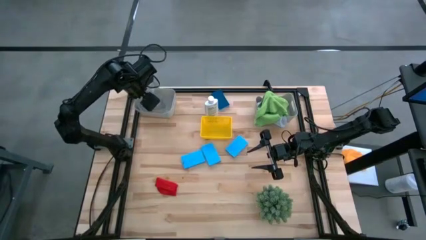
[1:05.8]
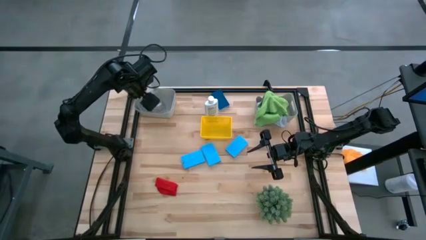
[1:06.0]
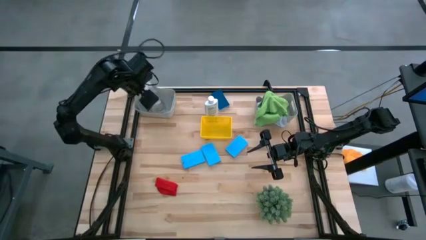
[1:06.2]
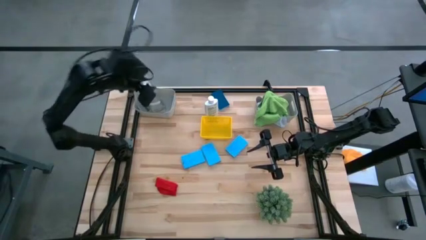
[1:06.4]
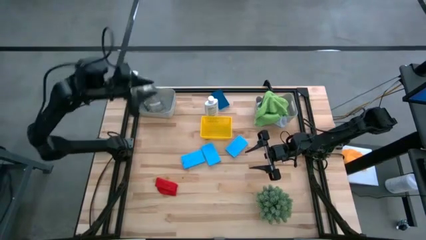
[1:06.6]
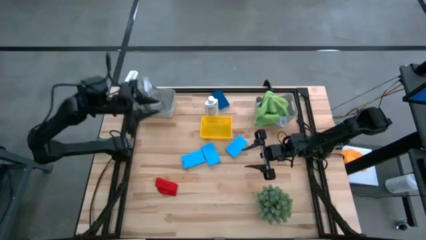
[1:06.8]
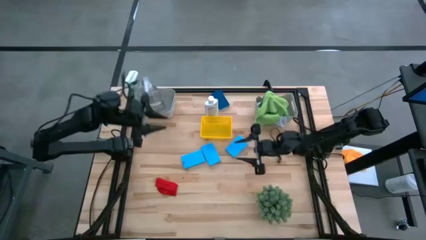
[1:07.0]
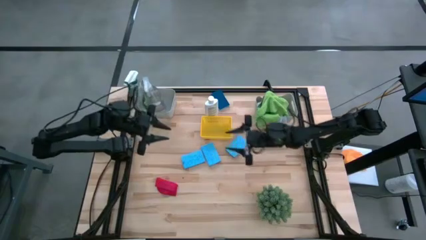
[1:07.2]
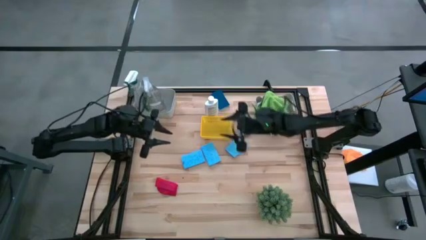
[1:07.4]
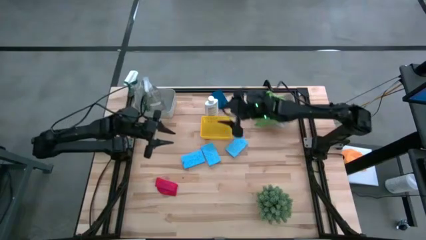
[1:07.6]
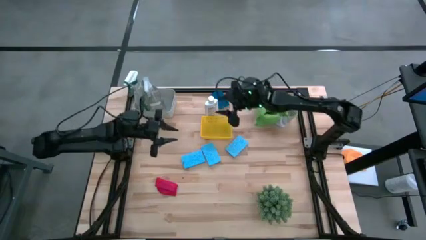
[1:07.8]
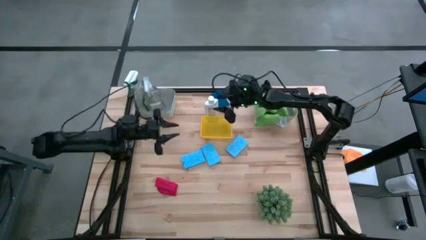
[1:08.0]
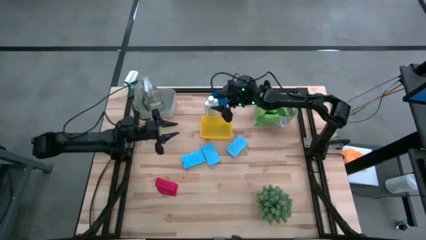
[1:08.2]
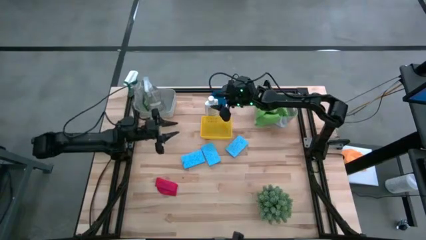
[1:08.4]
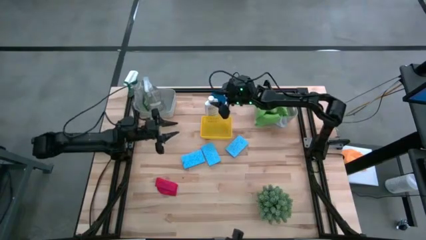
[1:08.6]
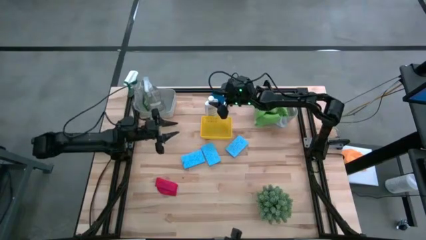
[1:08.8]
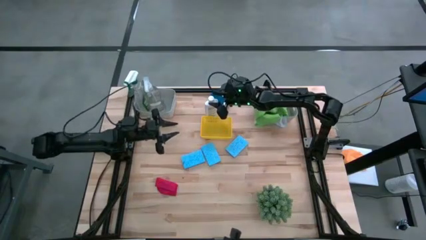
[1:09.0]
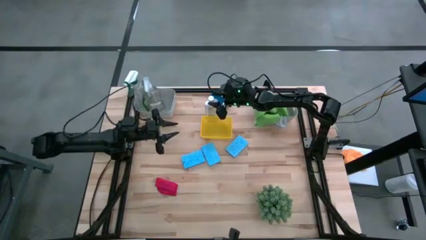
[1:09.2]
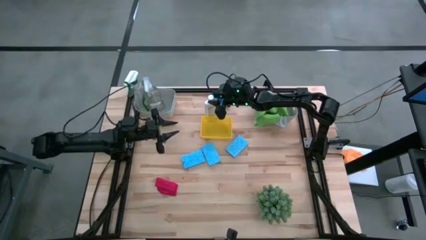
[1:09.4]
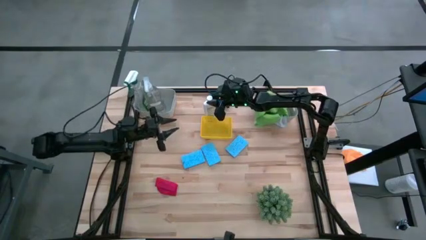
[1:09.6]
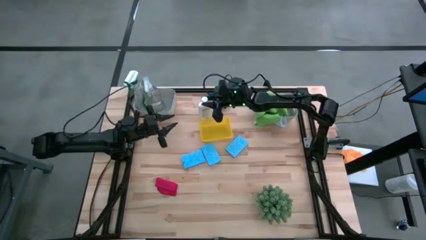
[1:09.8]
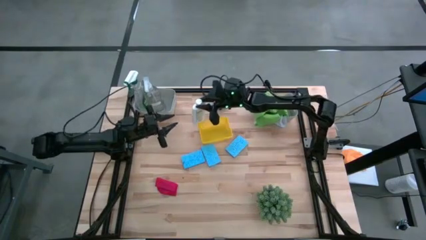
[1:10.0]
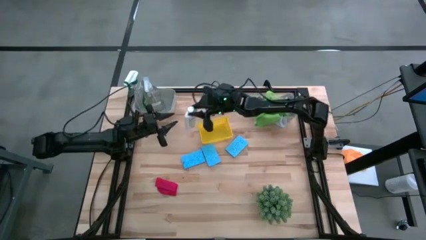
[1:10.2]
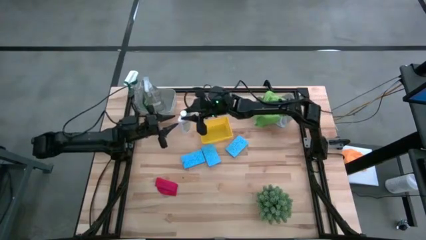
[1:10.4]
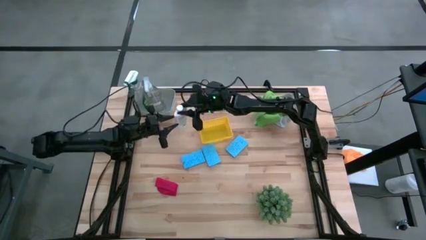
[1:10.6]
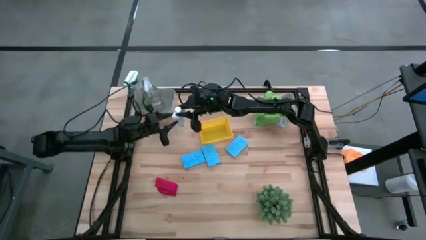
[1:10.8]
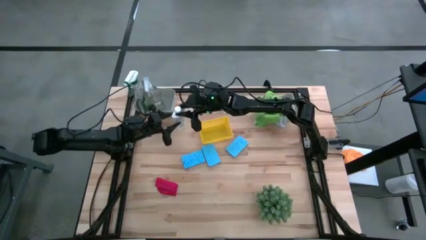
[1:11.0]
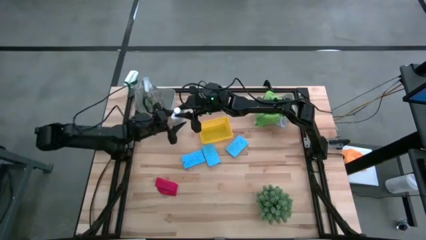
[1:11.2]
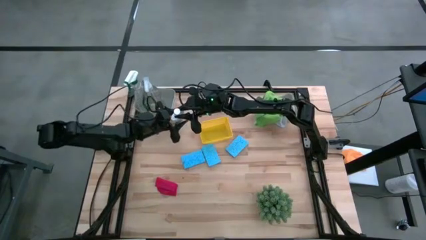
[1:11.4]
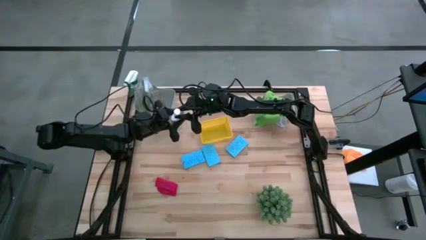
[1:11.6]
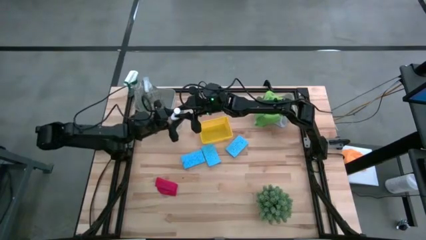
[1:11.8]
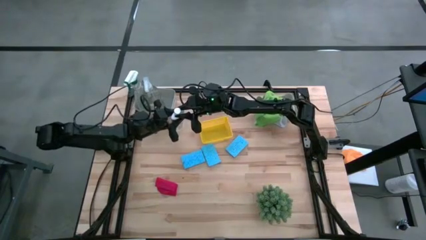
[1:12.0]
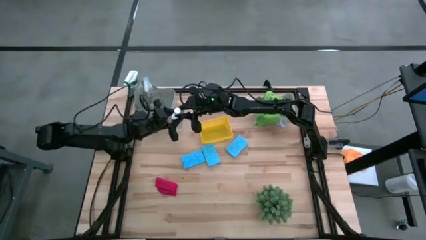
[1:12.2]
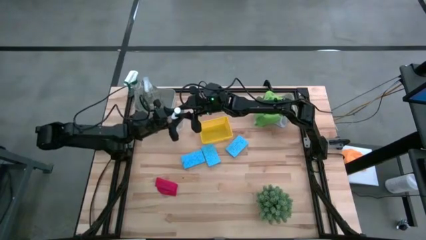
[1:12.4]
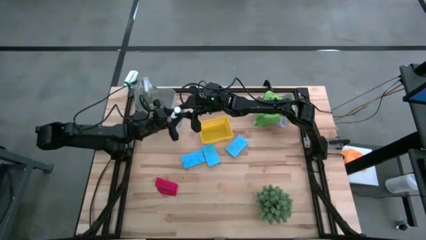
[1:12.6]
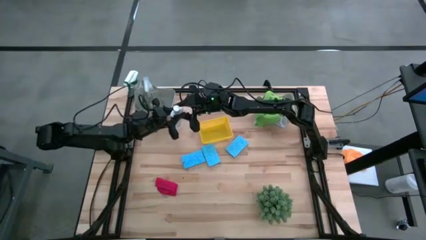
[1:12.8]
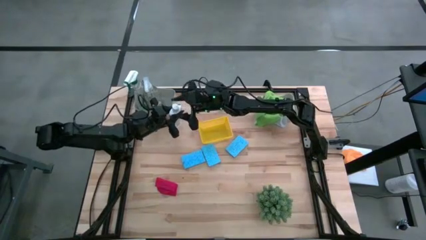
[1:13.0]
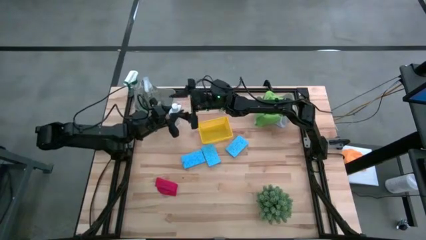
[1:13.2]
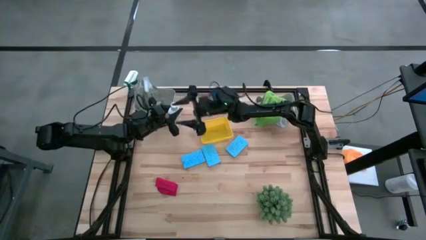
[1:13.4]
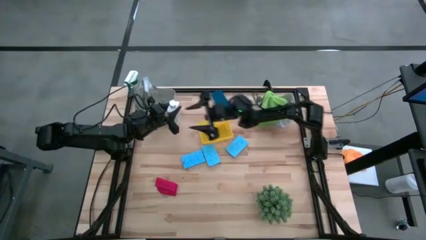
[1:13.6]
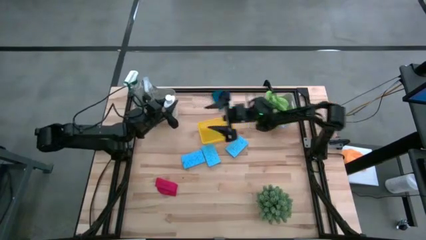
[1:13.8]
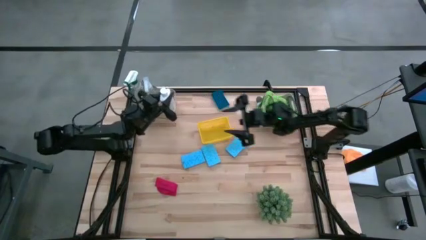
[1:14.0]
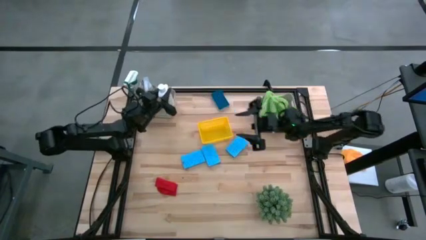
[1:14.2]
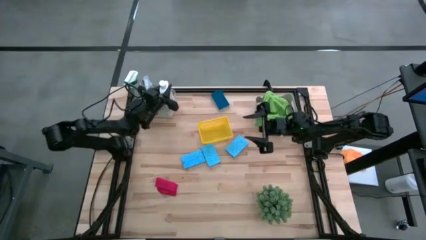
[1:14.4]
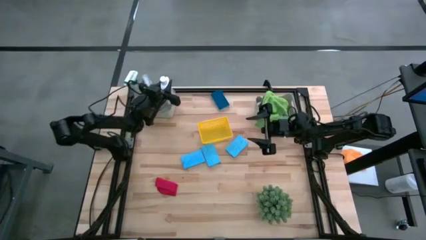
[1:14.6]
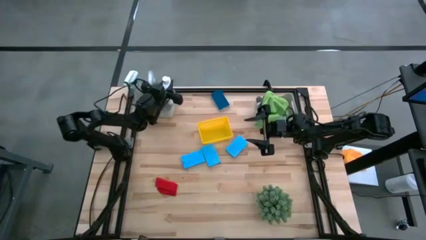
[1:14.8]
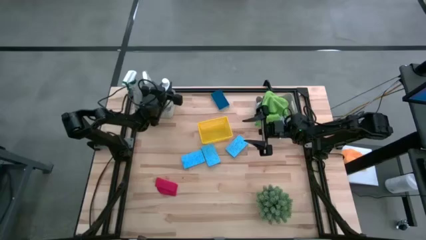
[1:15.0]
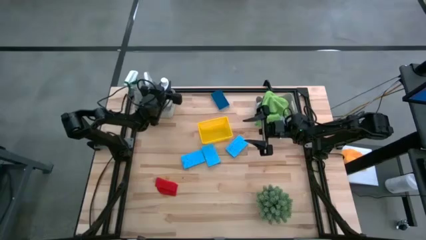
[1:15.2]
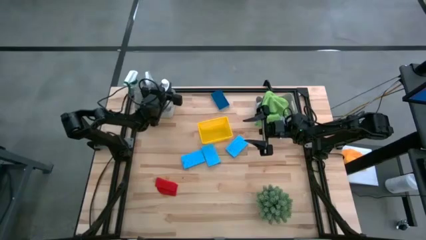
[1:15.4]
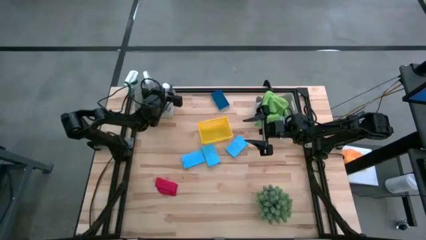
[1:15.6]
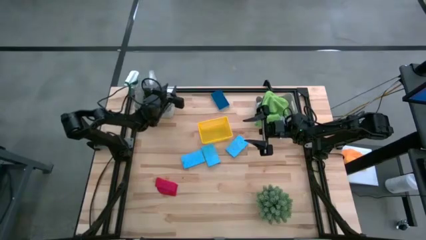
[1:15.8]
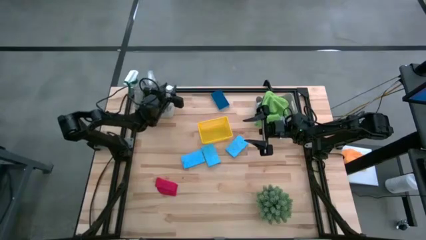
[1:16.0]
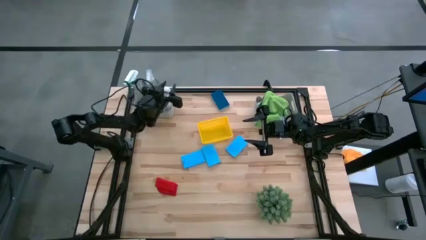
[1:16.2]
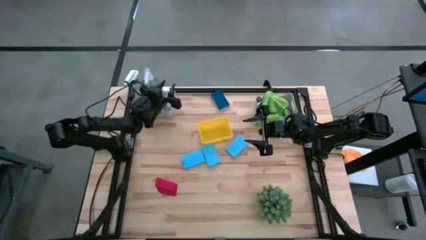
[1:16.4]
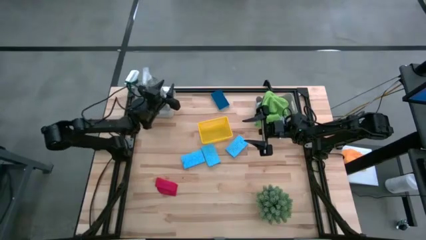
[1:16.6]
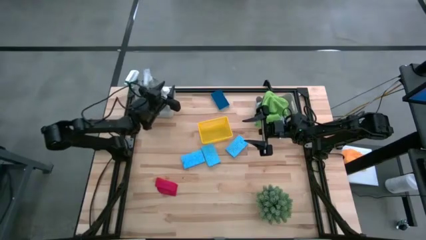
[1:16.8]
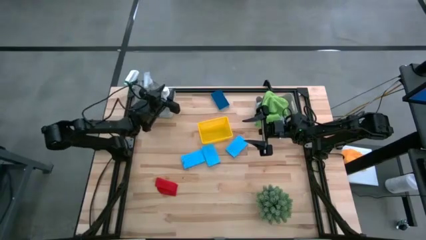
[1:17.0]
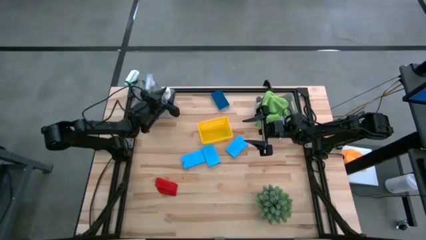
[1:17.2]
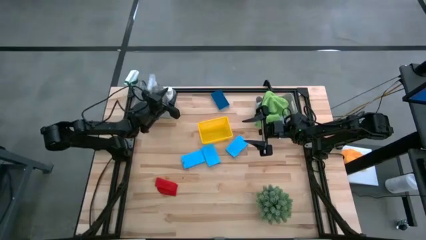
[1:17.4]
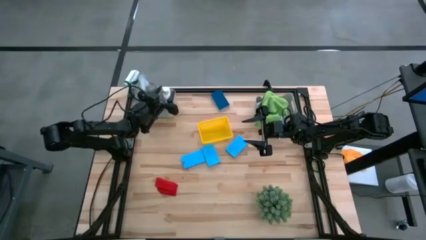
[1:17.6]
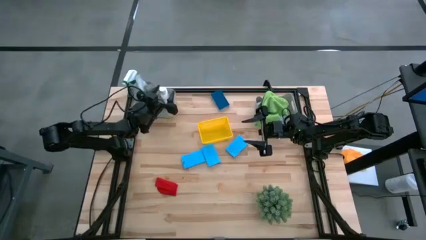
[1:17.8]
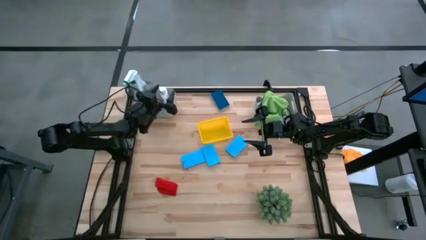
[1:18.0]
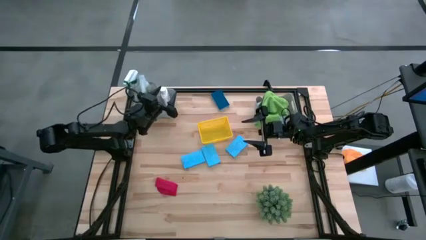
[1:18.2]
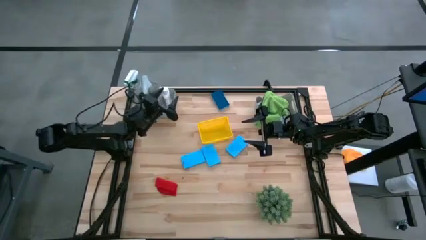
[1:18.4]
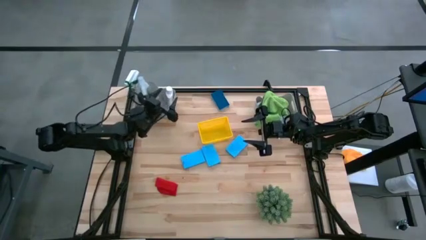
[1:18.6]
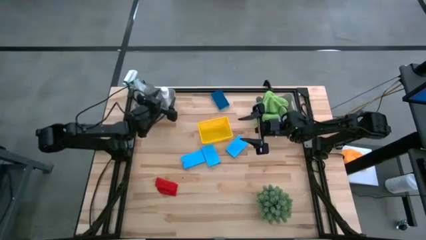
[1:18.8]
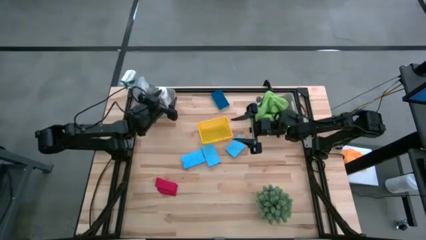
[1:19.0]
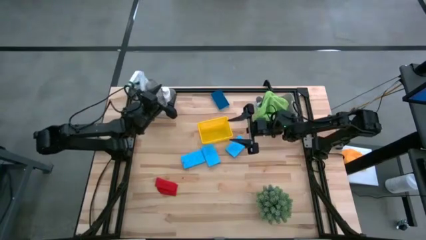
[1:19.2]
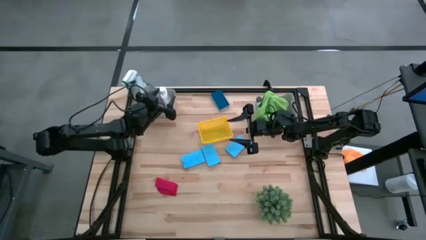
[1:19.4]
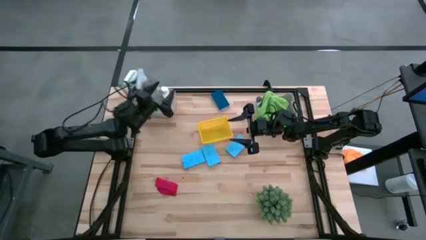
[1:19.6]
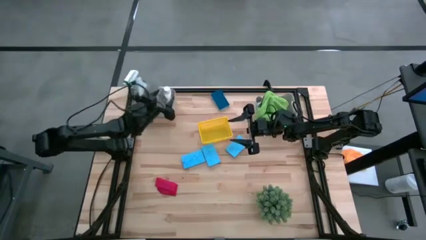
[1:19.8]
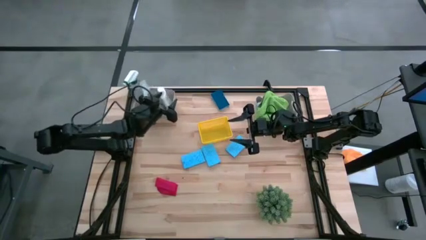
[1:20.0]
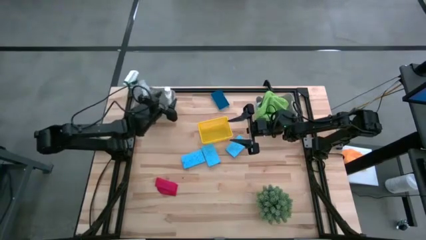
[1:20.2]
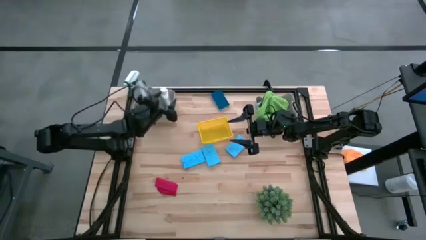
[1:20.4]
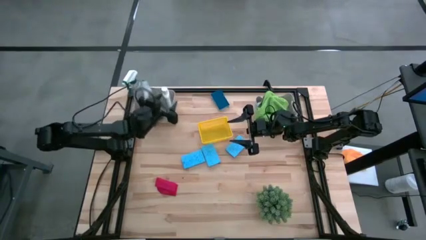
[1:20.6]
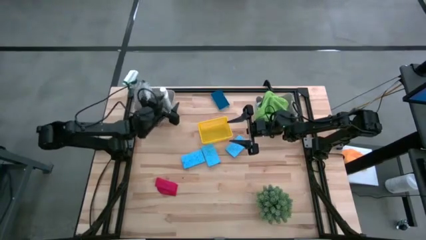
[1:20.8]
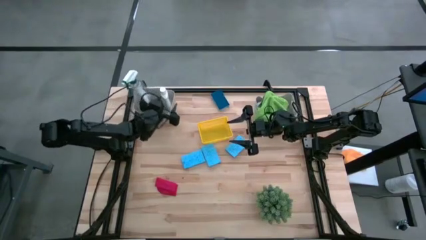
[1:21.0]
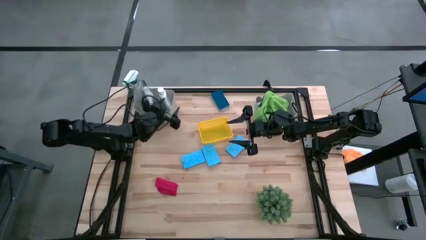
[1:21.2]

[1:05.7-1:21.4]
Task: Pick & Place Kitchen Items
Put the white plastic restorer bottle into the left gray bin
